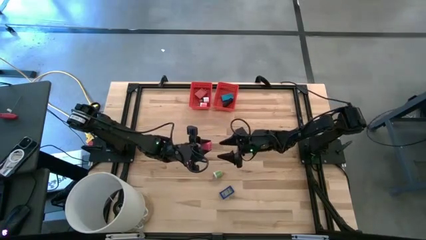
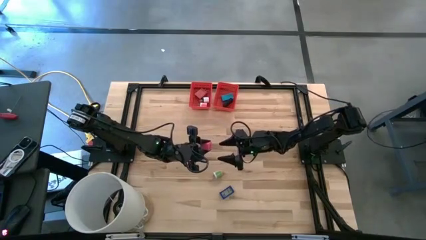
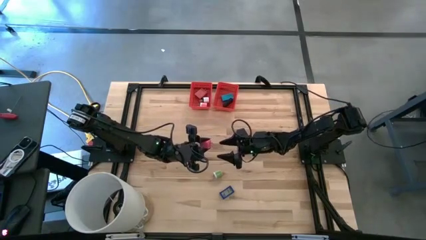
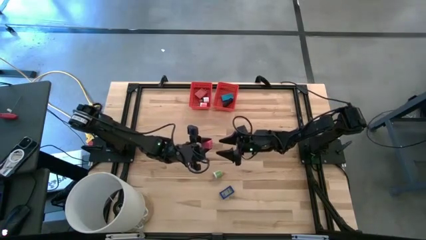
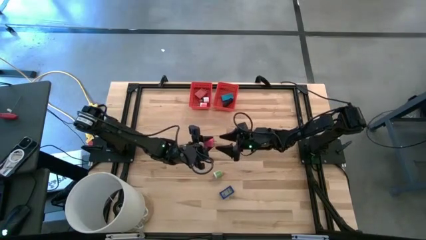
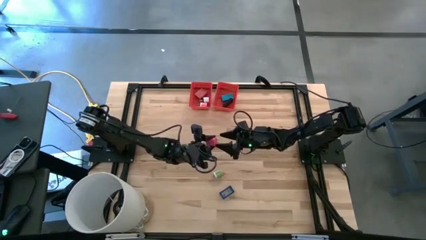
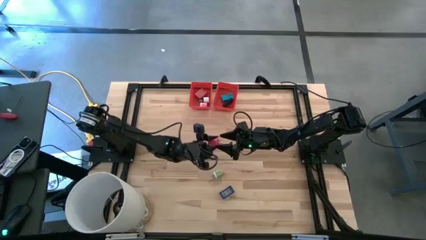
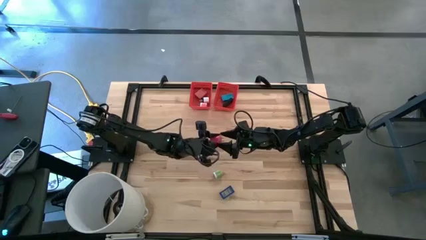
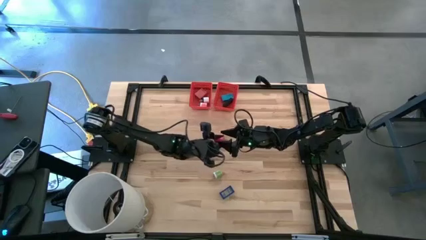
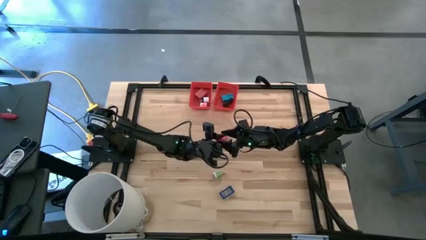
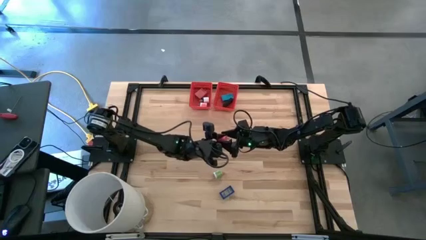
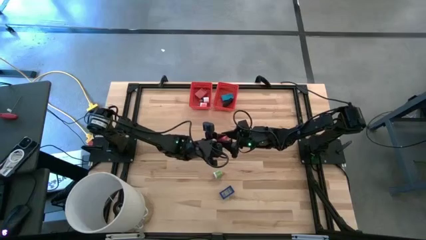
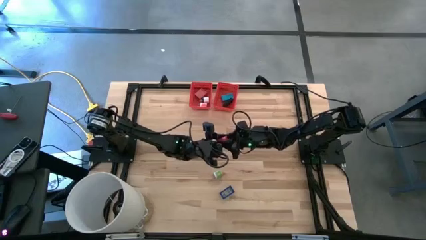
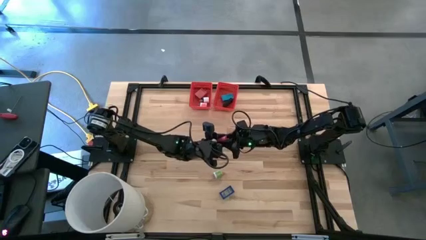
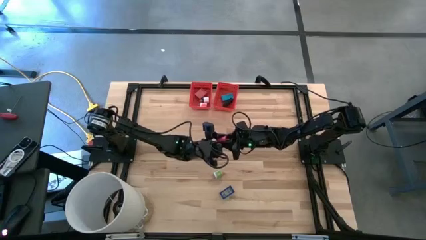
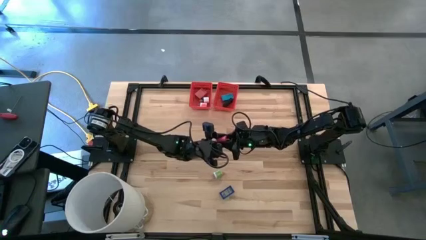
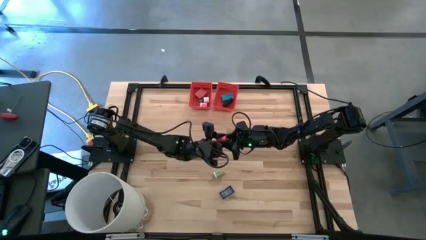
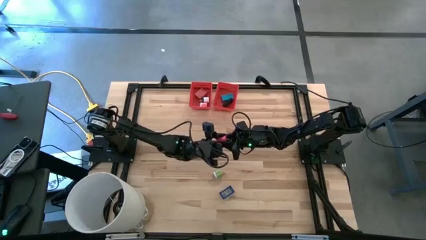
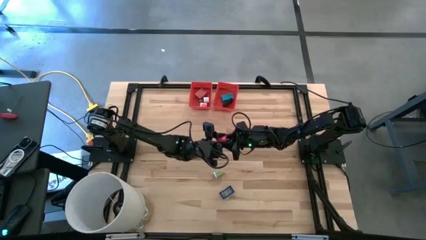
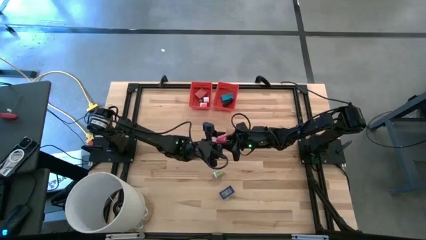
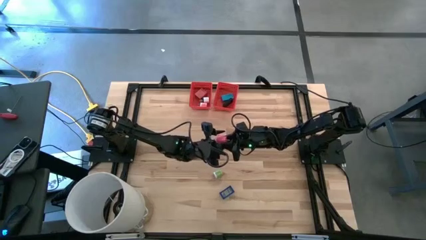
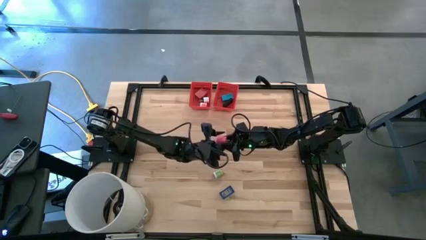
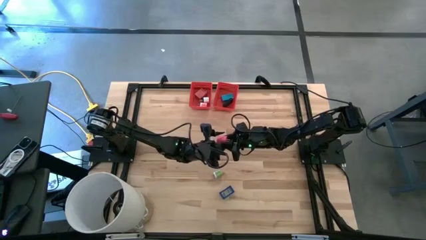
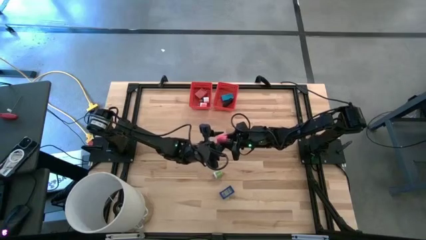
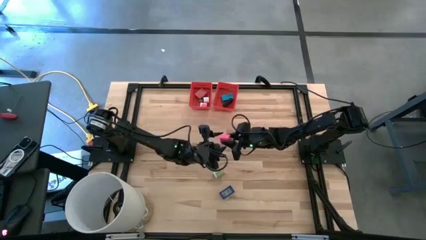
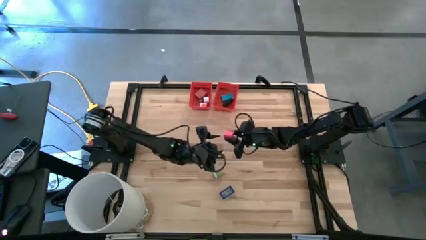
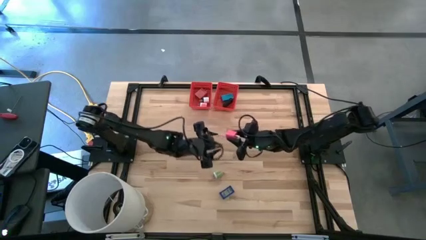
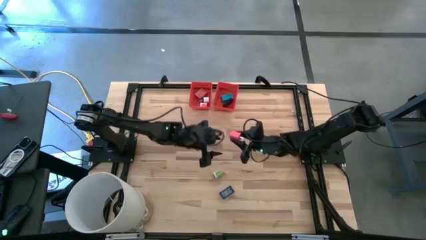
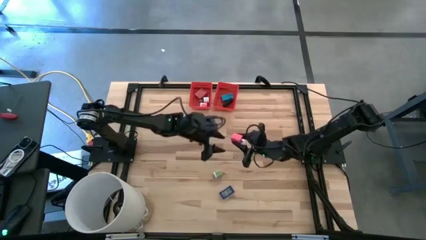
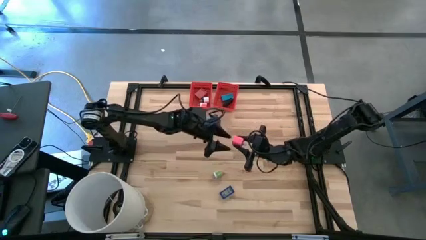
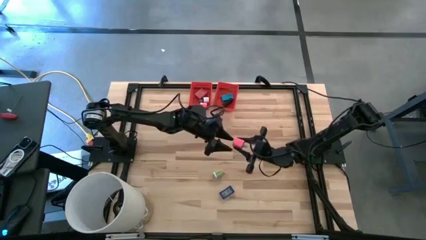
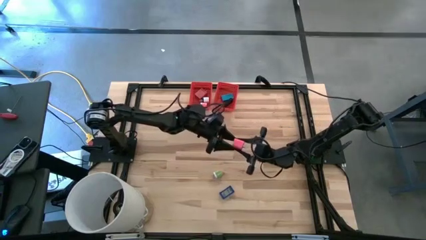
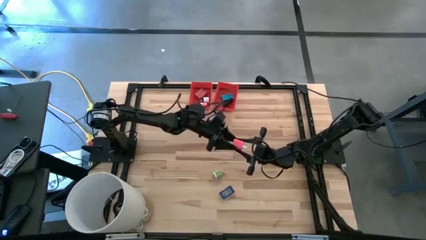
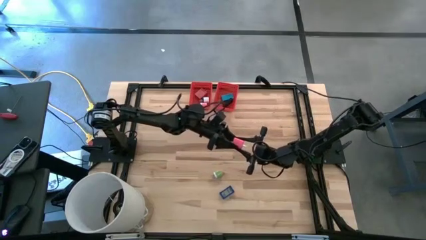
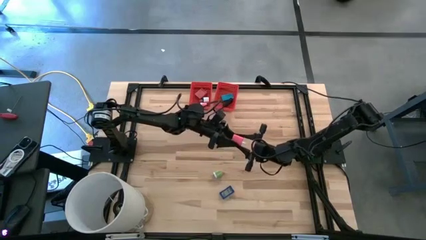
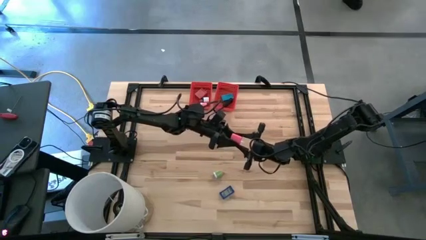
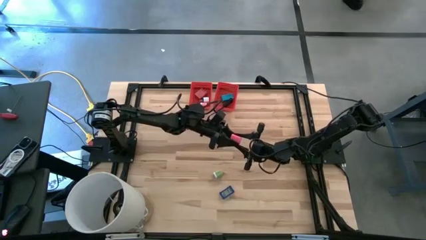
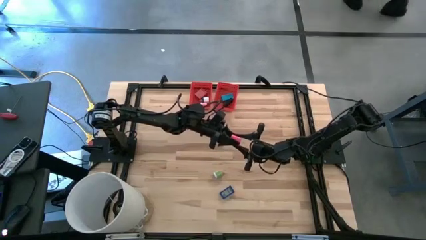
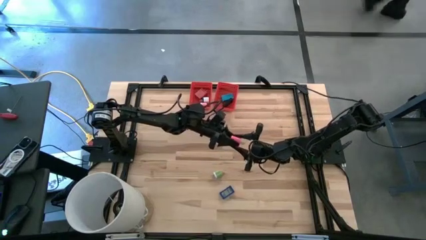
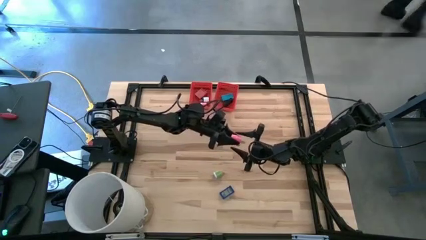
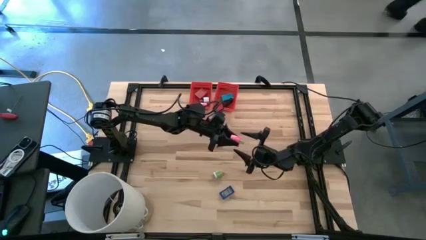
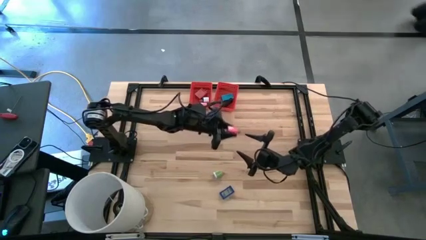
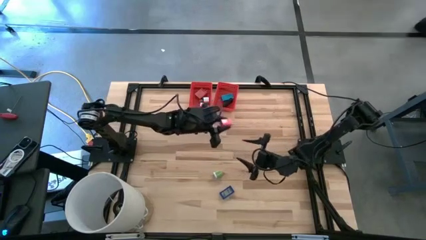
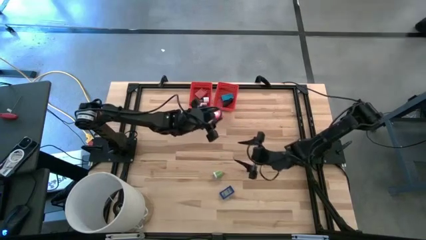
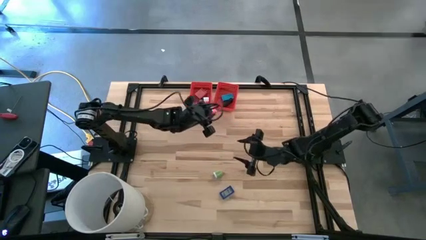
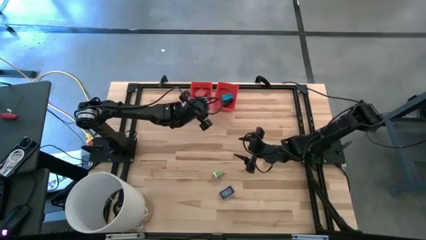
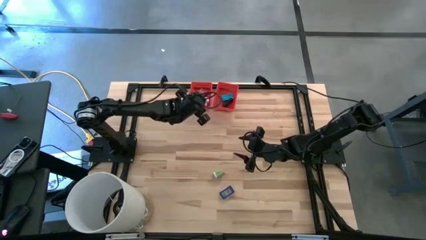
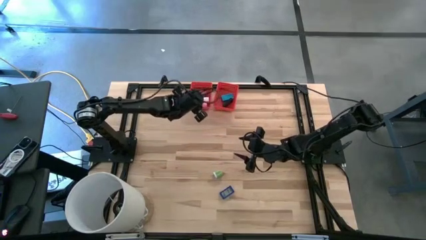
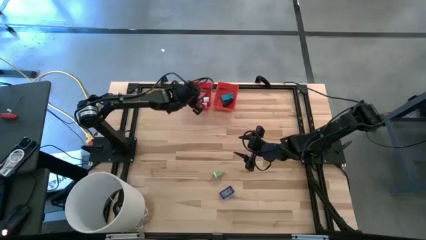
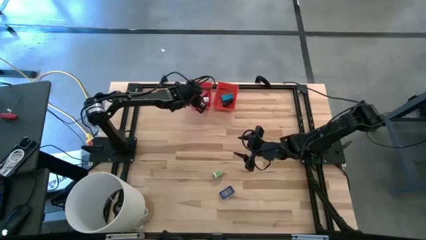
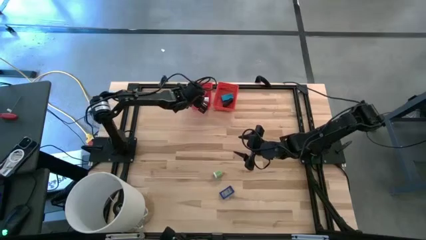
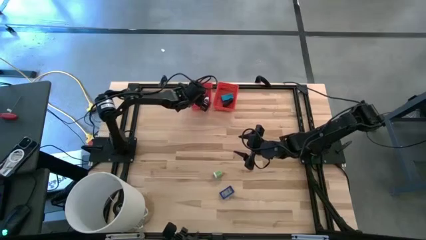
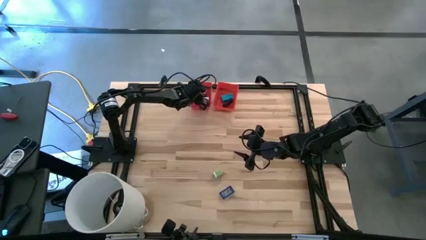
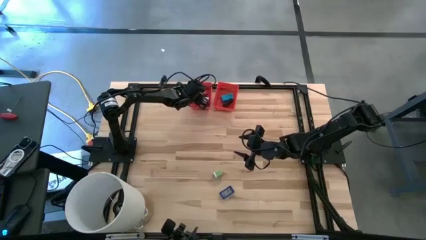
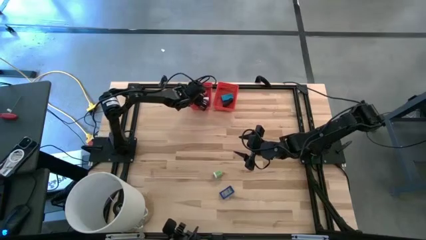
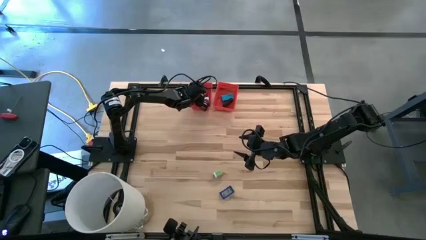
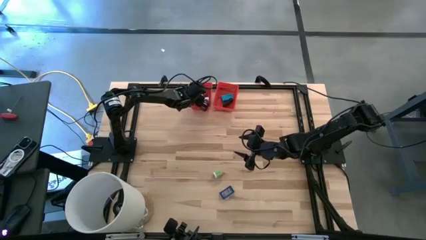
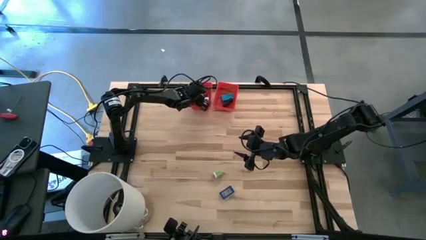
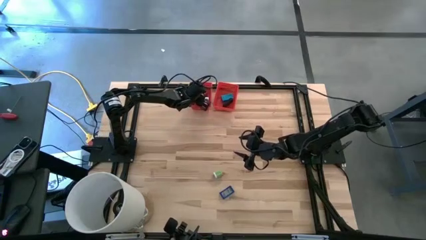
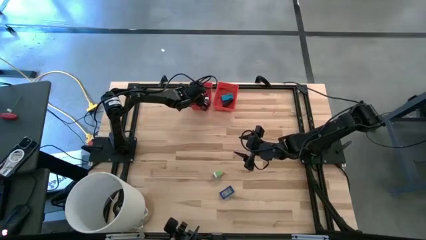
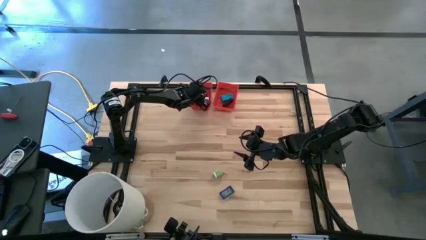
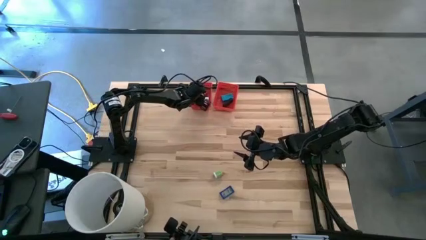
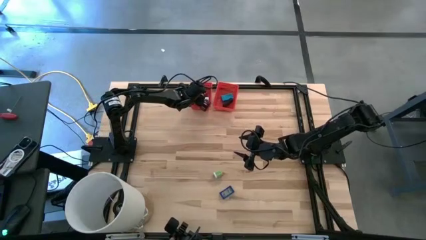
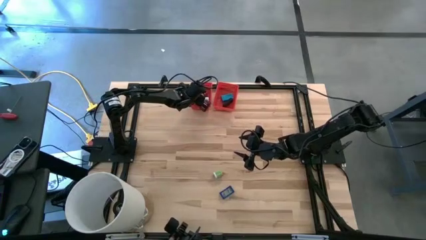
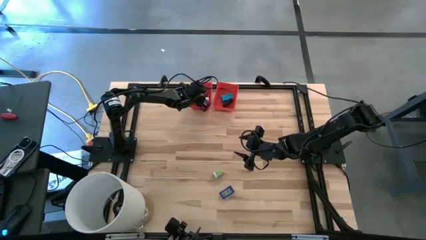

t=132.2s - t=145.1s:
Task: Pick & Place Office items
Put the pink charger adapter into the left red basket

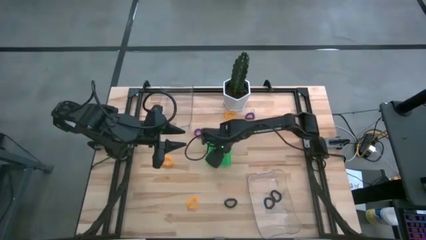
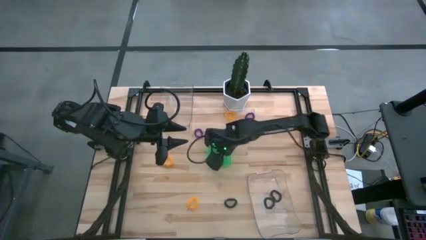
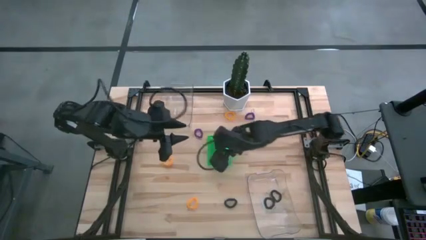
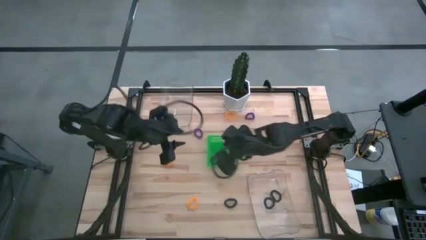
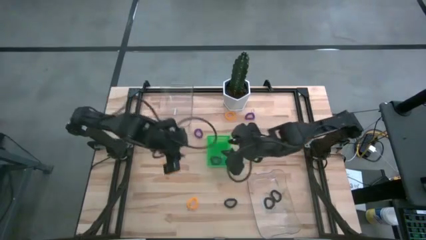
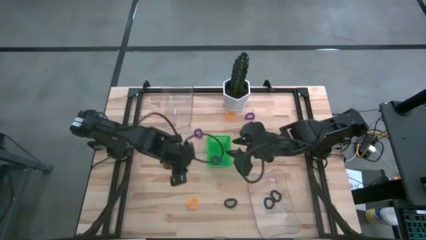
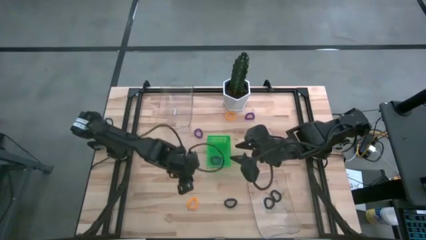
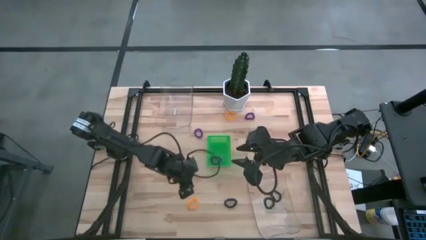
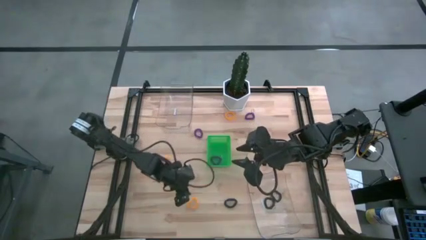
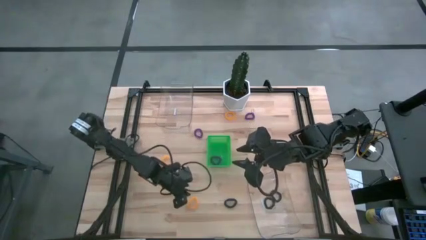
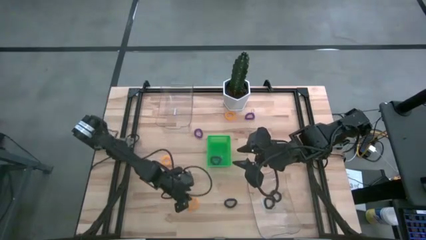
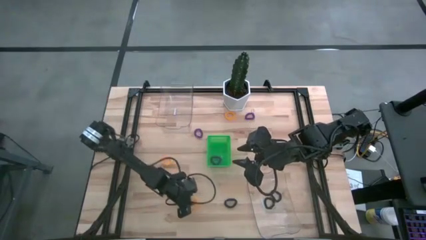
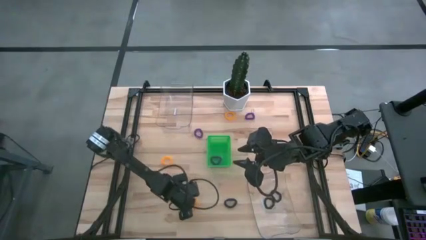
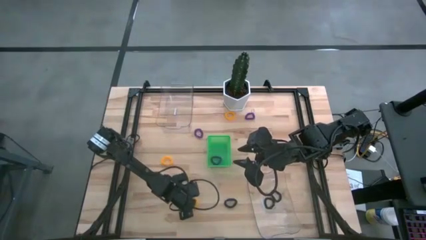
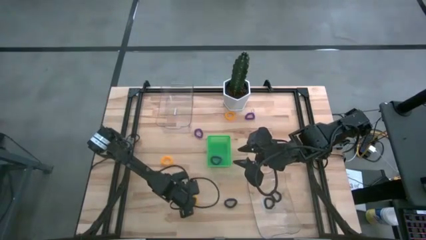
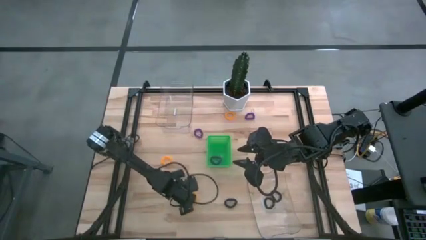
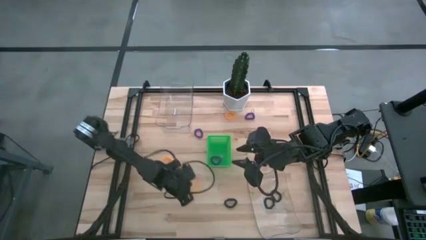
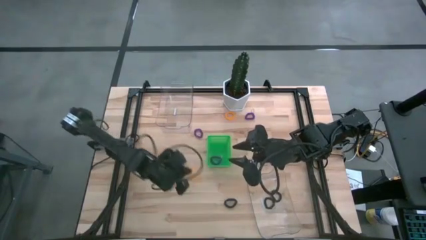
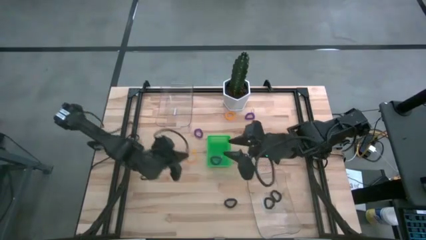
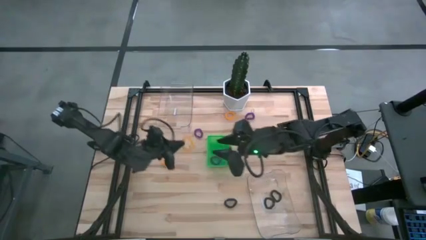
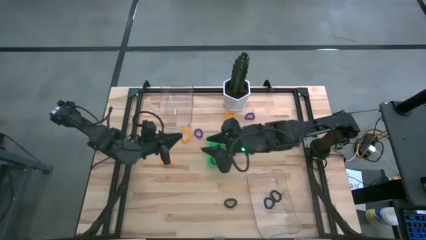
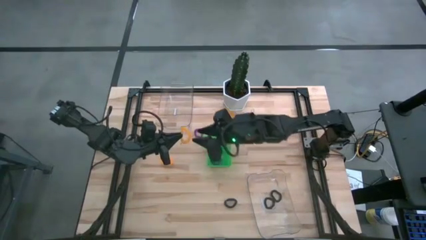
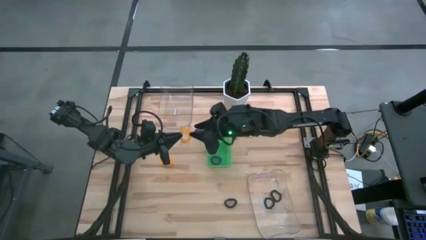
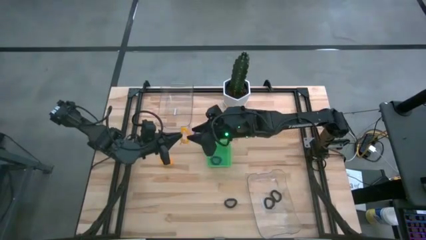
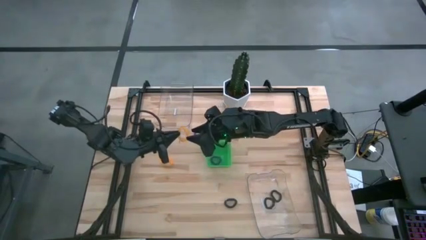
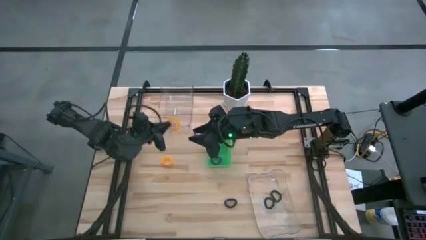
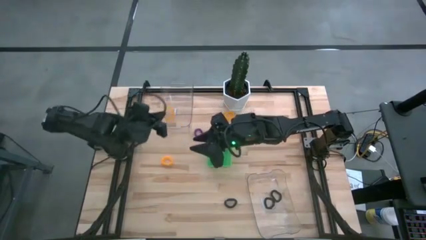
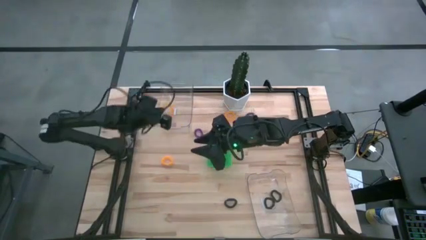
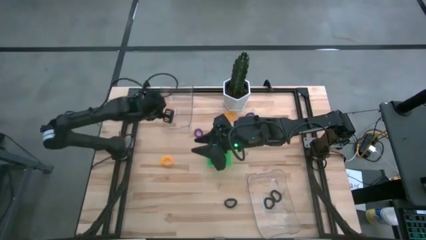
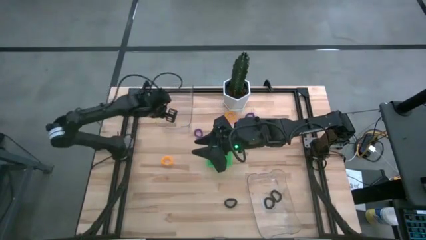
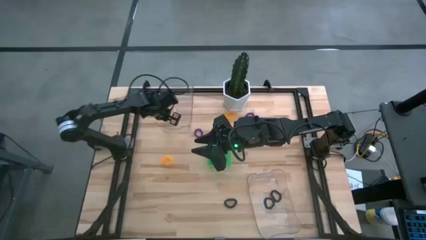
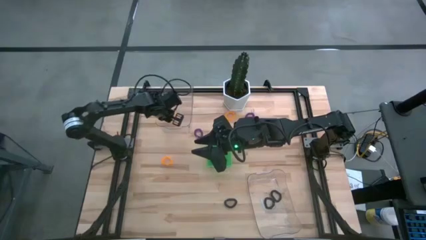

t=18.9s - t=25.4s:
Task: Sort spring keychains
Put the bottom yellow spring keychain into the top transparent bin
